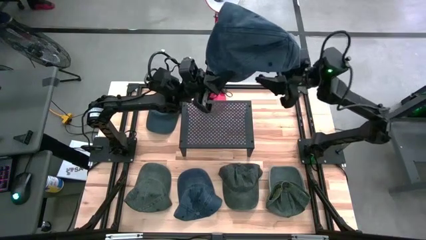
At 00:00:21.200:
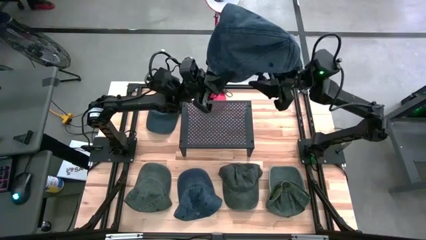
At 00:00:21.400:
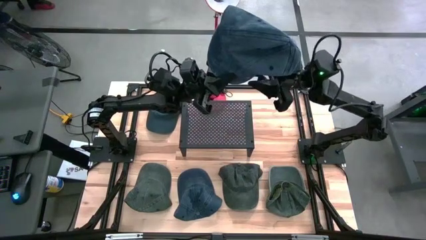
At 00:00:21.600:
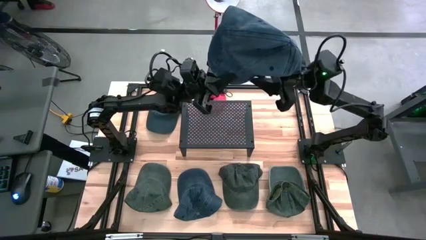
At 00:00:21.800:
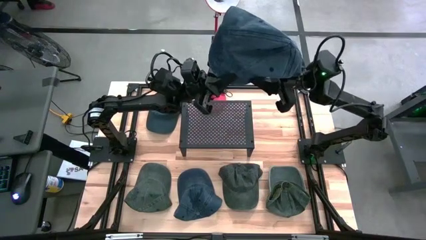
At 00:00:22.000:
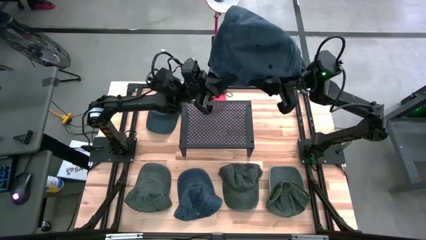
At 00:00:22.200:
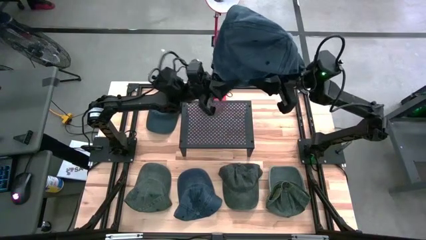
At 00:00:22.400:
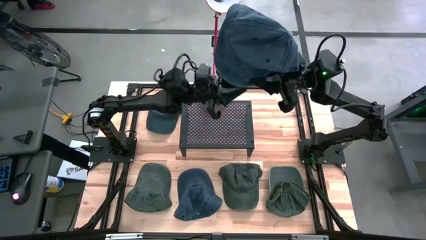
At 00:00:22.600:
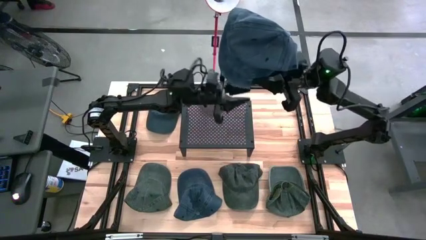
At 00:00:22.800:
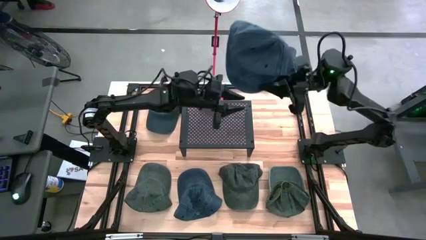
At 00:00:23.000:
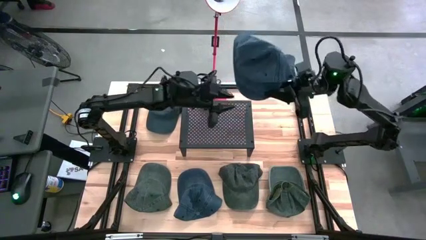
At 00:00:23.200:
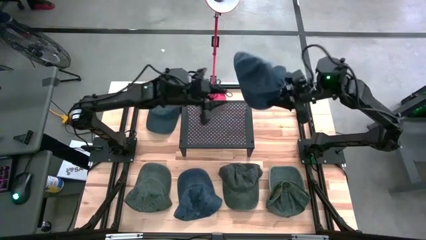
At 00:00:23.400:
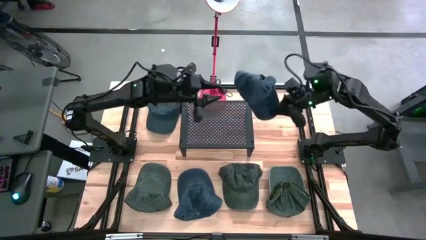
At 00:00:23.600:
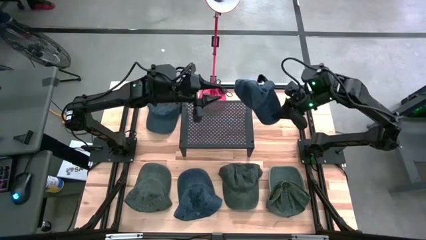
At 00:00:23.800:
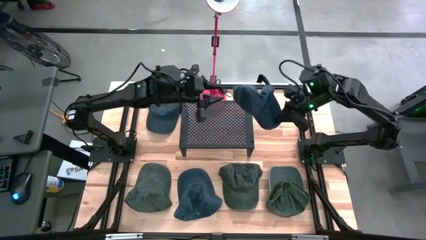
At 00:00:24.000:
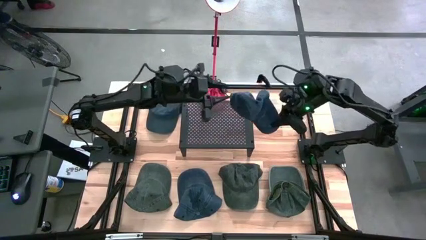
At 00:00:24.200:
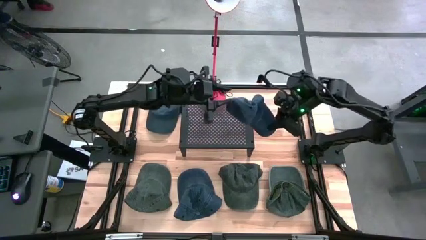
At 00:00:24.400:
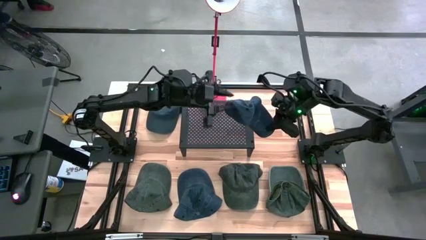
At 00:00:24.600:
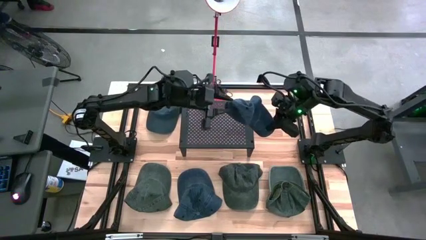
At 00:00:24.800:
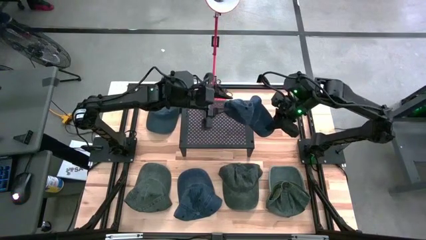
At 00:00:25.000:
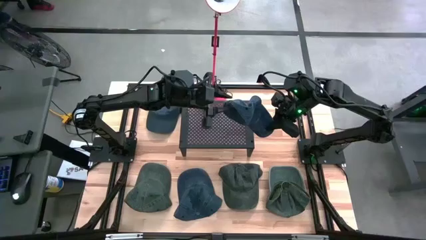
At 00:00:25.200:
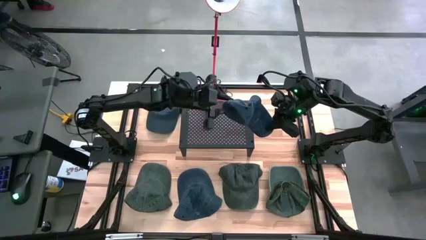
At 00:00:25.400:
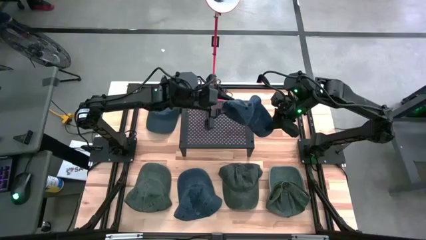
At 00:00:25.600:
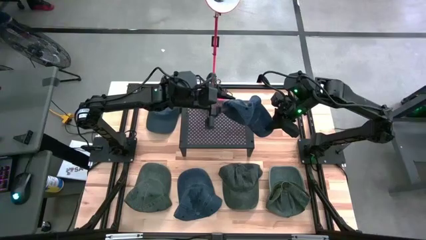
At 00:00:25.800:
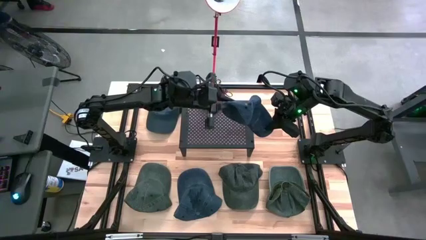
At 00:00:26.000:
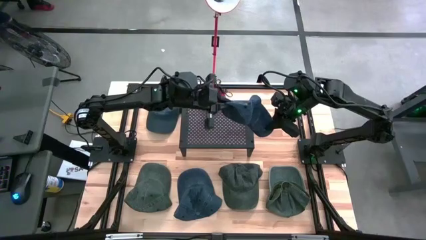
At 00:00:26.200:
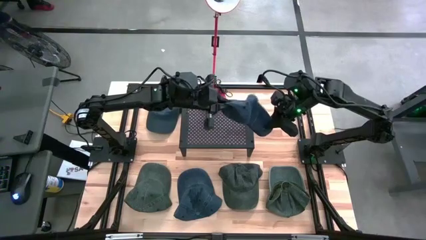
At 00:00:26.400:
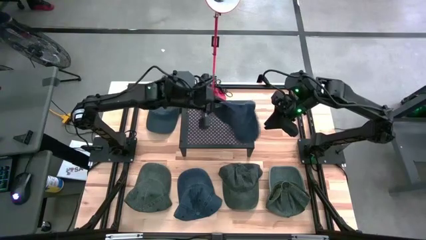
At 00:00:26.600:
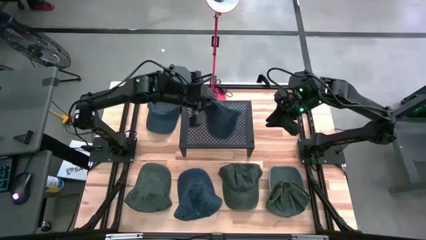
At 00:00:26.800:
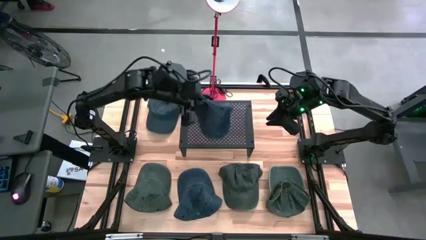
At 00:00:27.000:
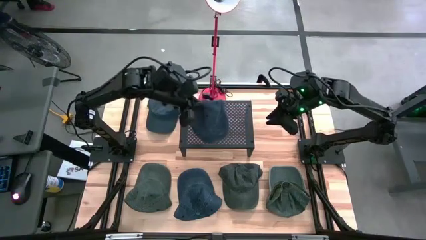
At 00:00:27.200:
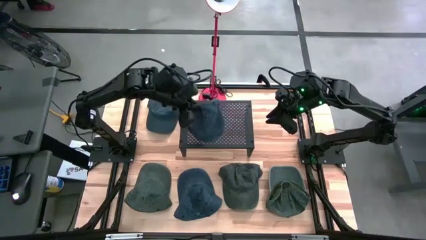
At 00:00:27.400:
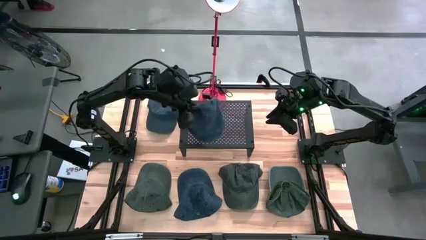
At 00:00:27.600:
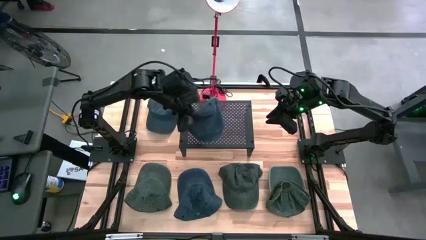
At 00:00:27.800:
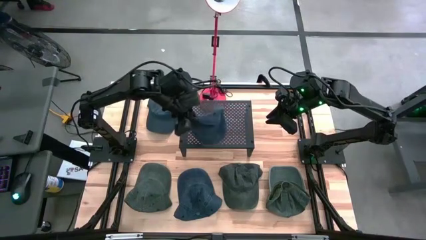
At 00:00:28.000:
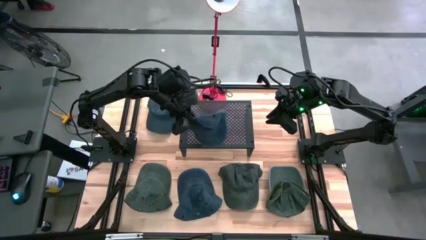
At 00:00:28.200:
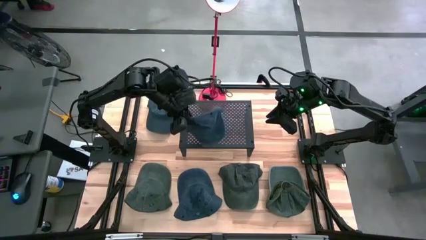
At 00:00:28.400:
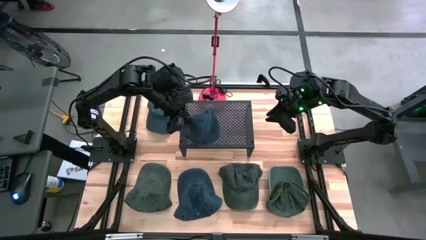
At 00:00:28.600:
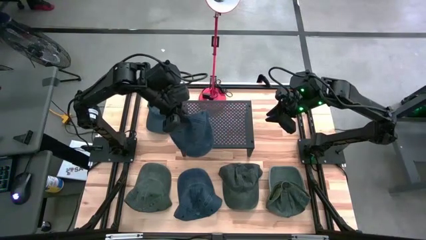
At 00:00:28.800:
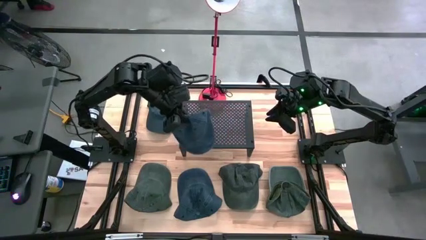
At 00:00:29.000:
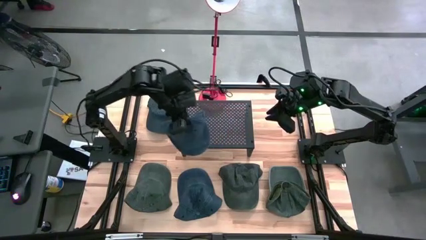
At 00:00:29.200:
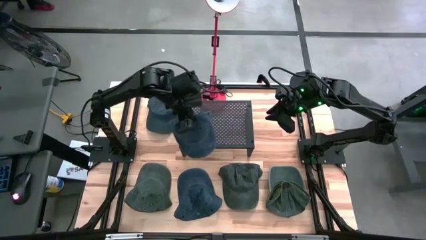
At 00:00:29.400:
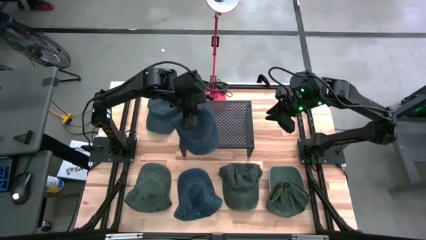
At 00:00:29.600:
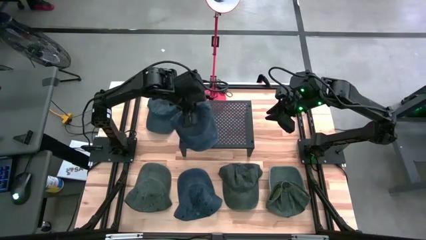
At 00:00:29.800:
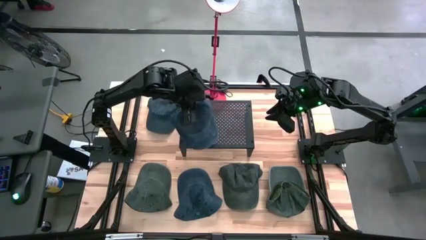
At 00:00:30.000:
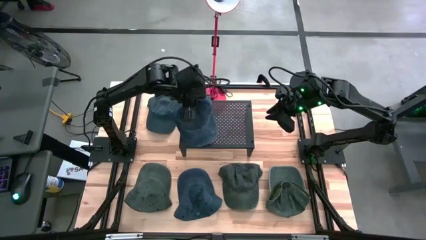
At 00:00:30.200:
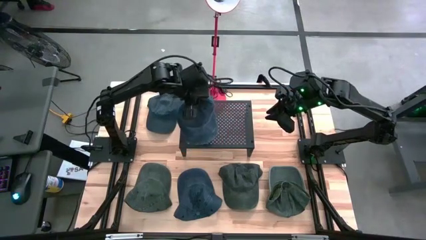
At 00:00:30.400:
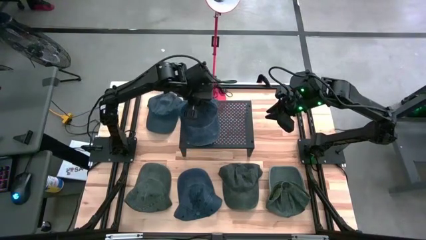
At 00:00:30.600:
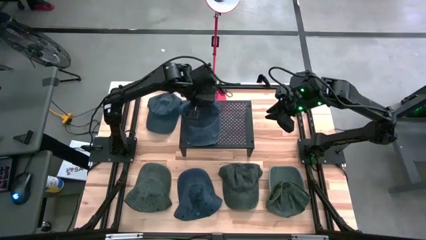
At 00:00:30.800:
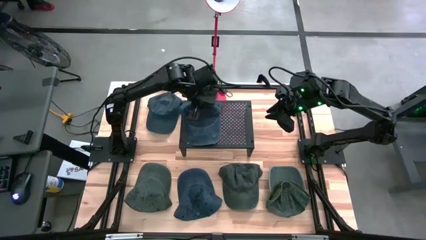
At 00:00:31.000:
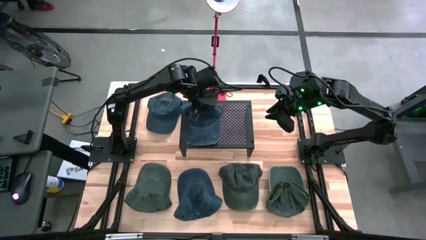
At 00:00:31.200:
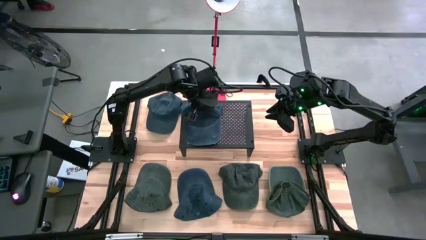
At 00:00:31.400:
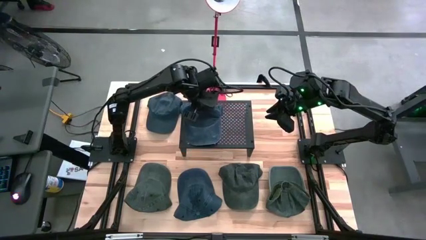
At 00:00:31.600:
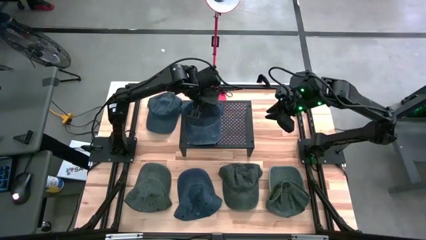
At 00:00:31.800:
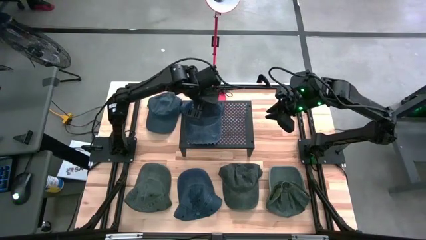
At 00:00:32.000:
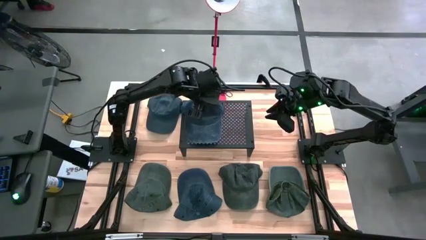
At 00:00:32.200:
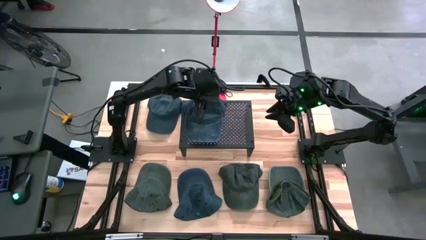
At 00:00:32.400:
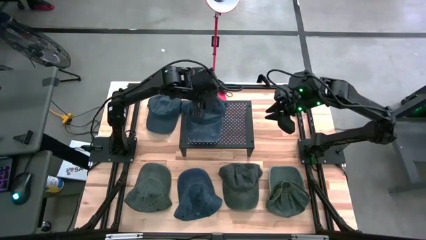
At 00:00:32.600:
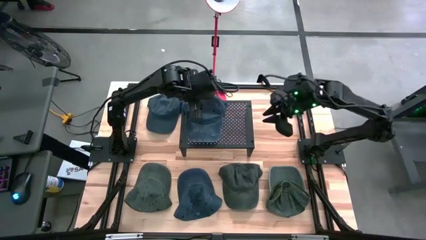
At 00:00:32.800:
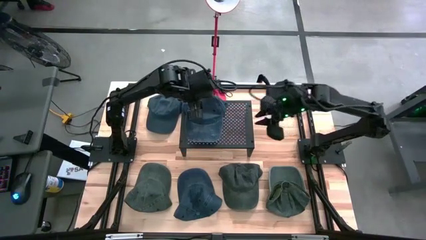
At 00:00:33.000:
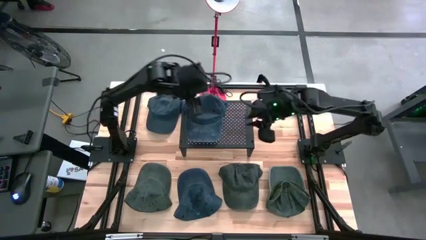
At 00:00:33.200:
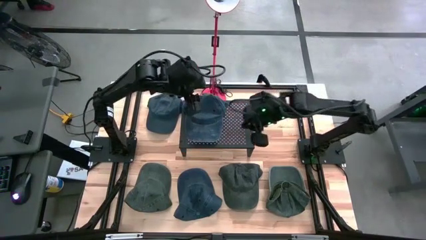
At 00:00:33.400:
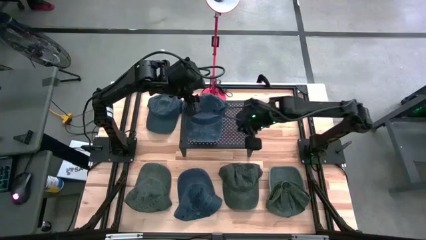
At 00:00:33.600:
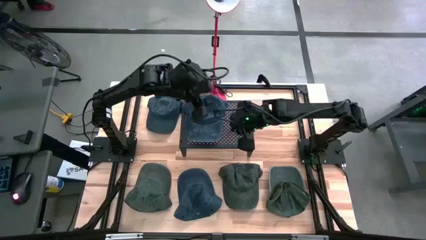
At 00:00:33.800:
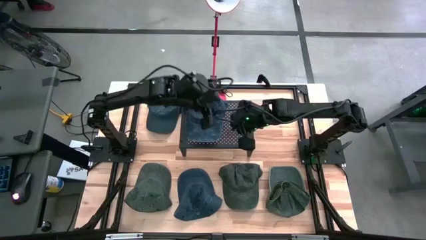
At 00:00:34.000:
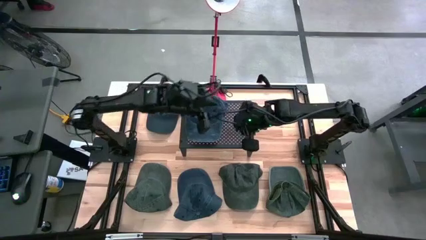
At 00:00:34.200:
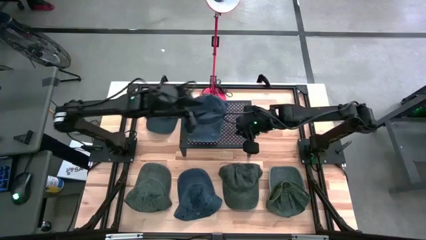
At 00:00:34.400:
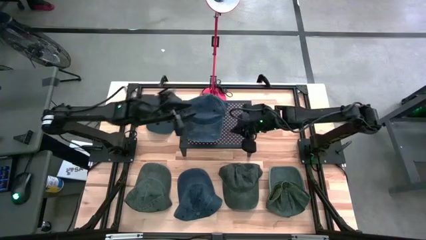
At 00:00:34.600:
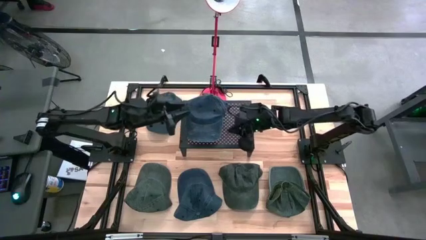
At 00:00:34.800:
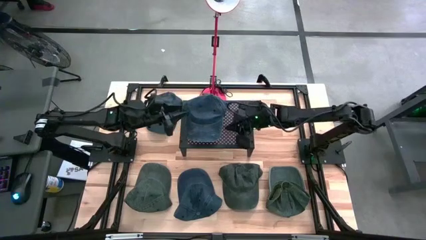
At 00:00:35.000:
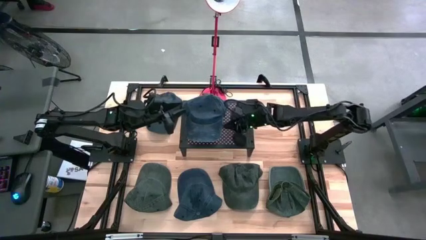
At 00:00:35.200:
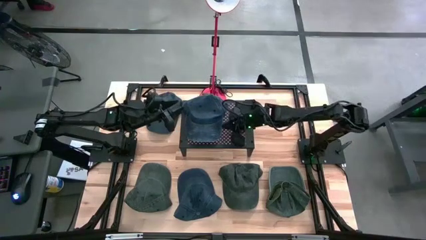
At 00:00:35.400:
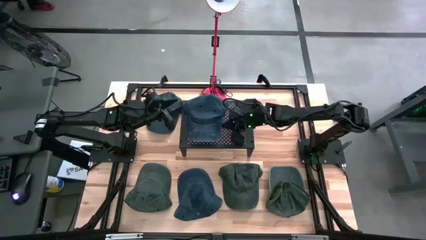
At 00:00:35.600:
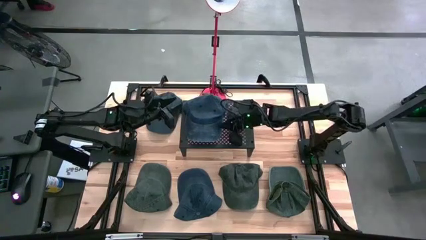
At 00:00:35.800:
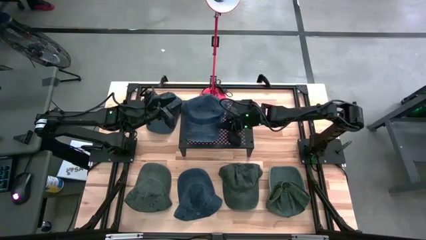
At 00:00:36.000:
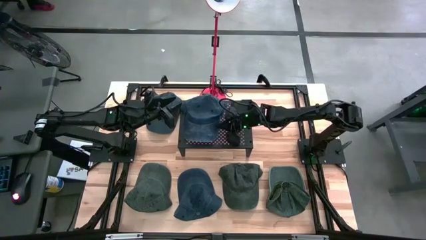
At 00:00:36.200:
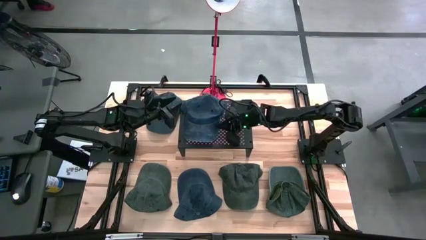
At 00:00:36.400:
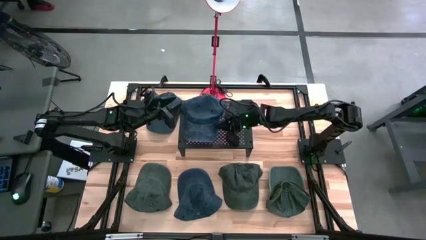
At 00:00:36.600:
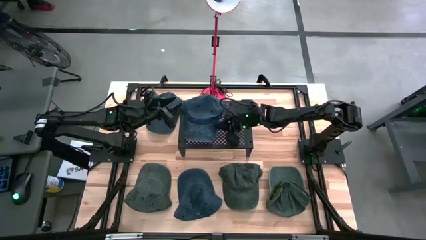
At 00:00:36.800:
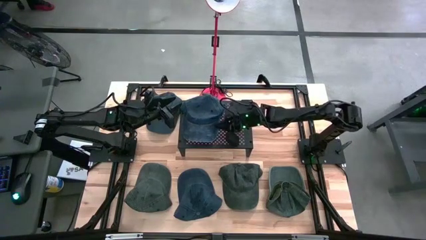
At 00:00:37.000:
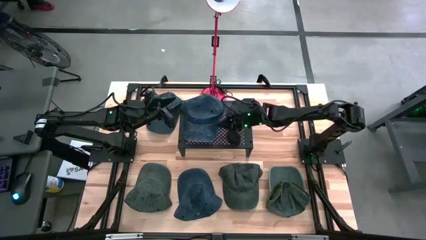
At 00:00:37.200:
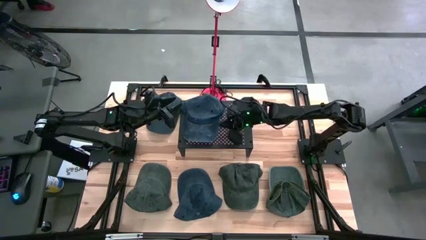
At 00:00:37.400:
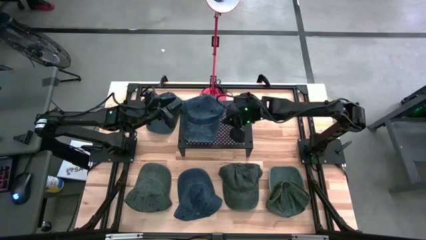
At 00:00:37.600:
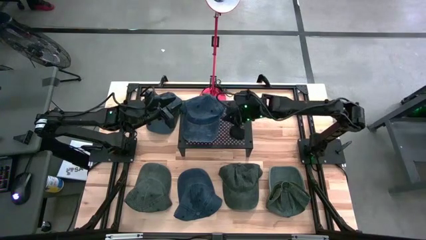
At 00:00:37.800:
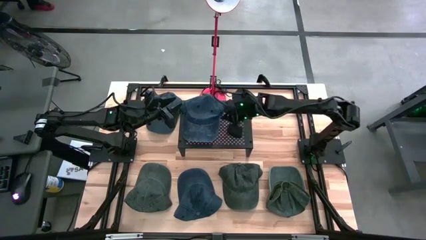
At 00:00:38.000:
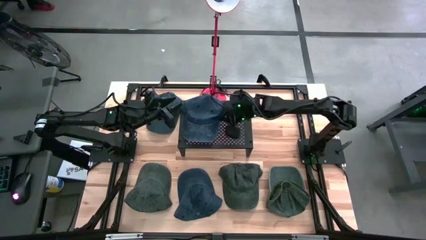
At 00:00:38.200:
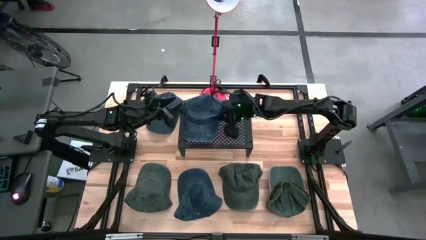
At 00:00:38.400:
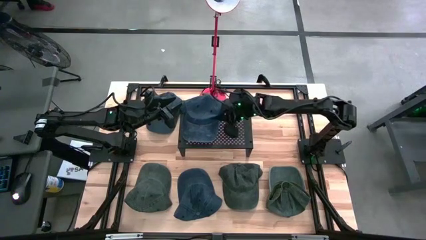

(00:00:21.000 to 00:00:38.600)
Task: Pick & Place hat
Put the top right blue cap on the shelf
